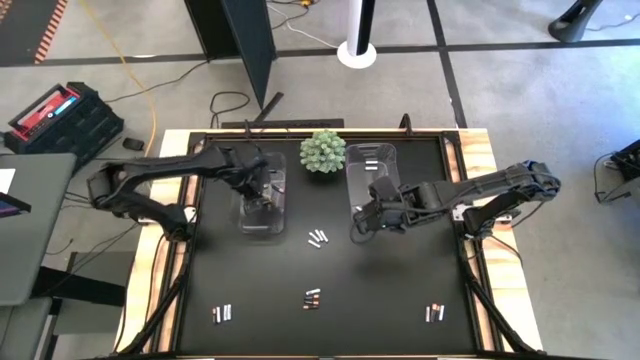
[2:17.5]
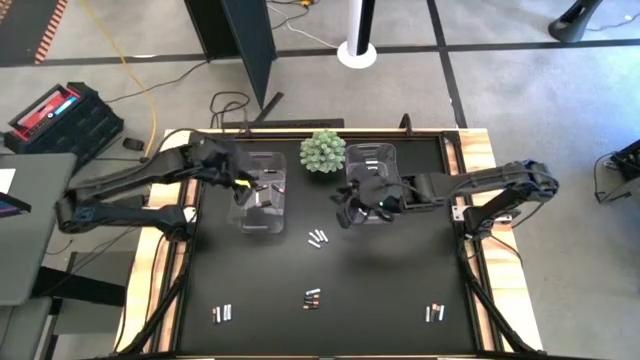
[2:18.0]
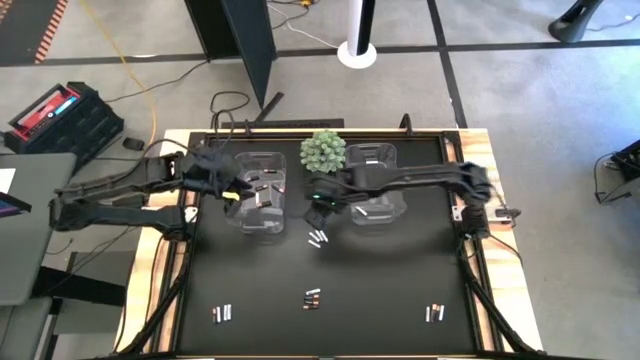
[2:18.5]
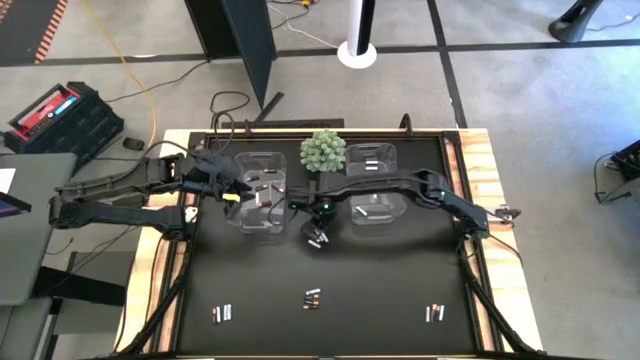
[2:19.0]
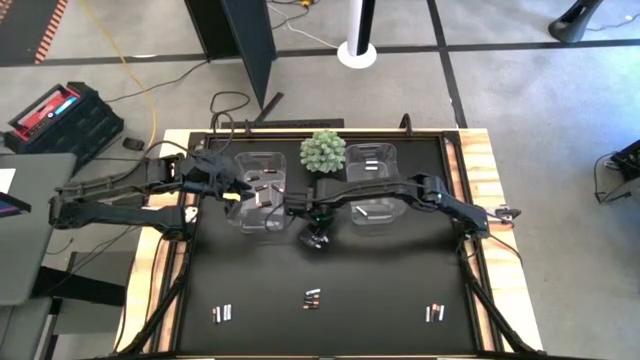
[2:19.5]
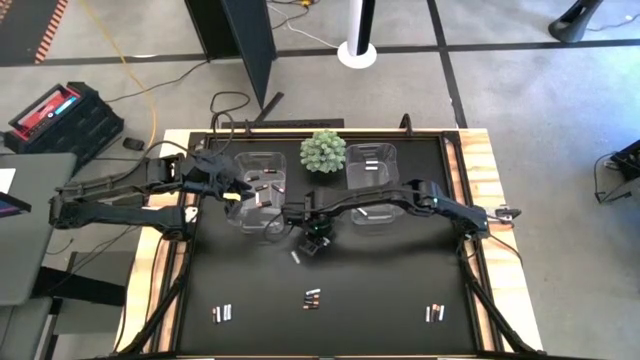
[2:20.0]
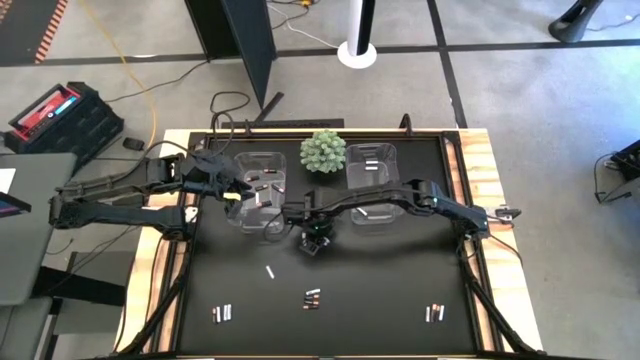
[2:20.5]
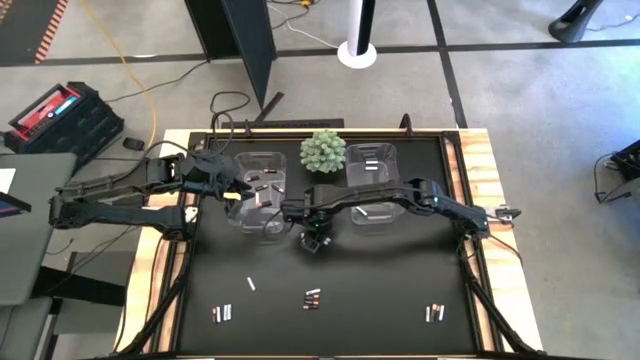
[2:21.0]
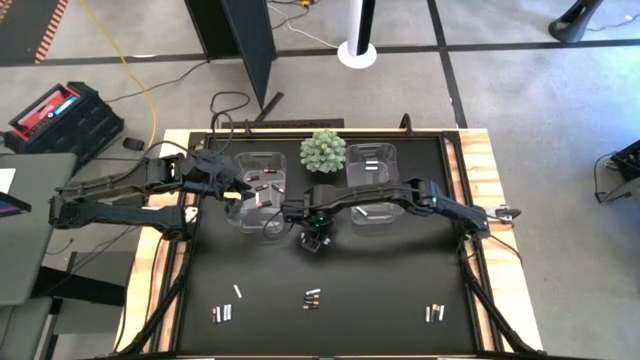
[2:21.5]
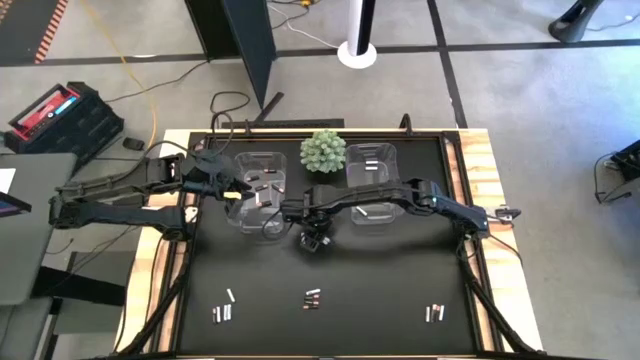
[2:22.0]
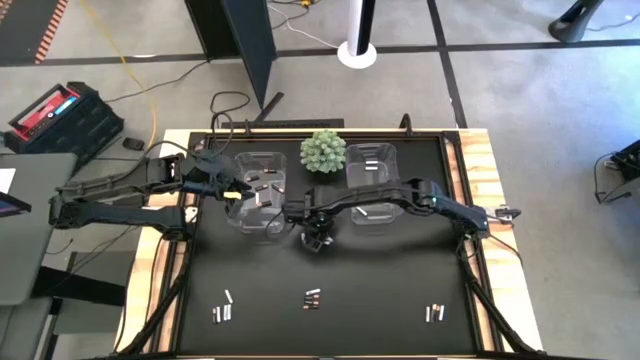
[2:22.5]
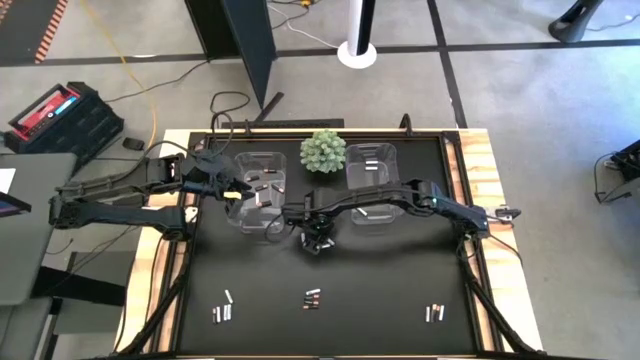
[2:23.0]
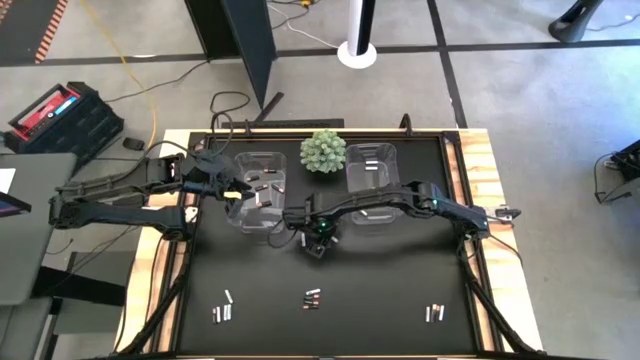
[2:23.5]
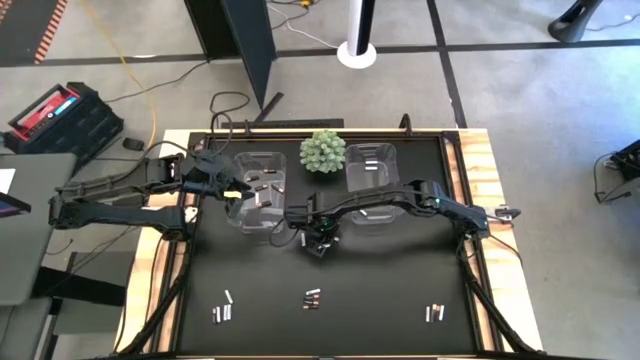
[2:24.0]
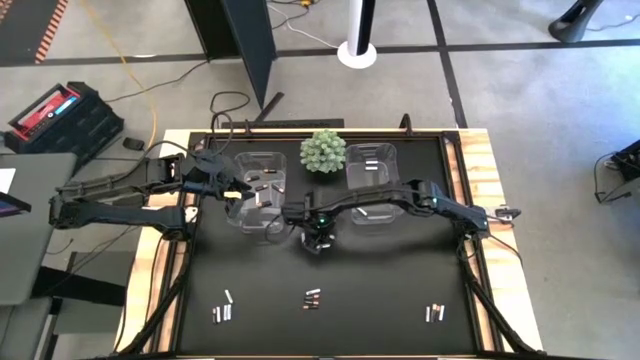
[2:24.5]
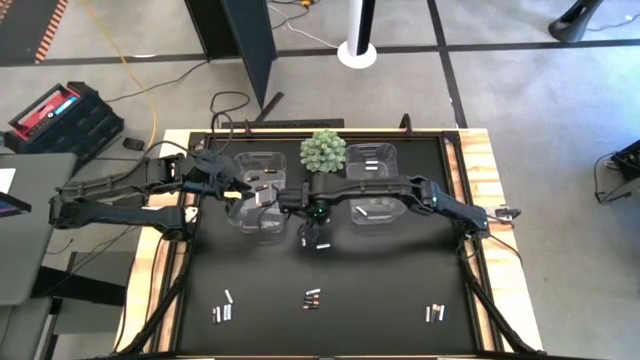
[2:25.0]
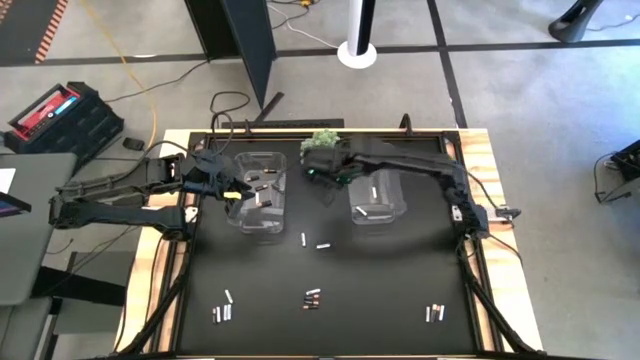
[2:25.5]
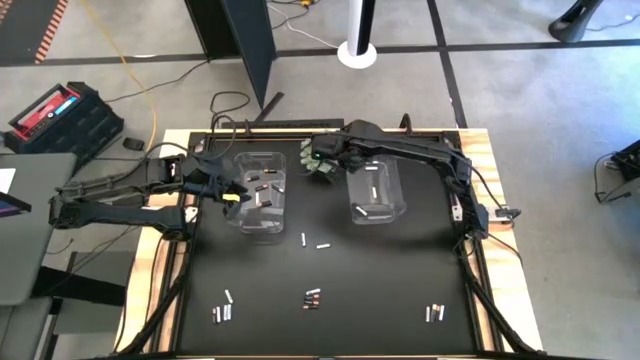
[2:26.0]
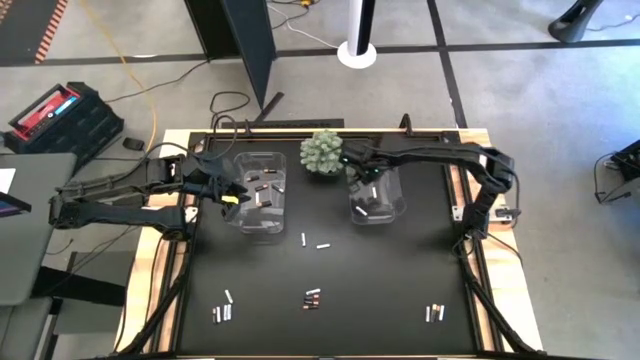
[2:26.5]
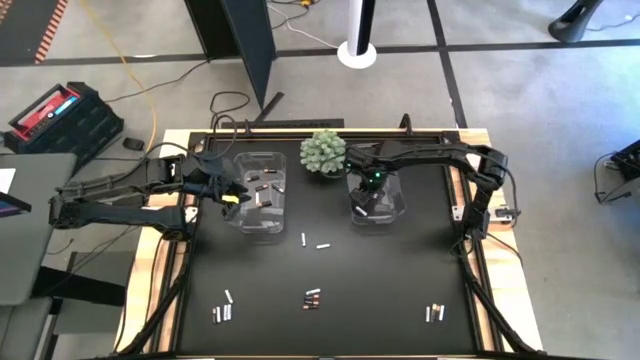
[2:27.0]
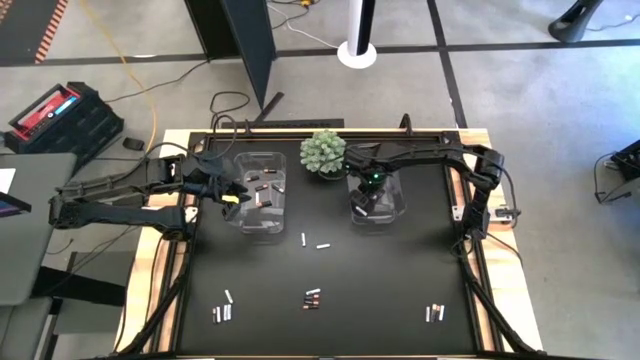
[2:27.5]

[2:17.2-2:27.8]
Task: Sort batteries
Put the white-blue battery into the right transparent bin

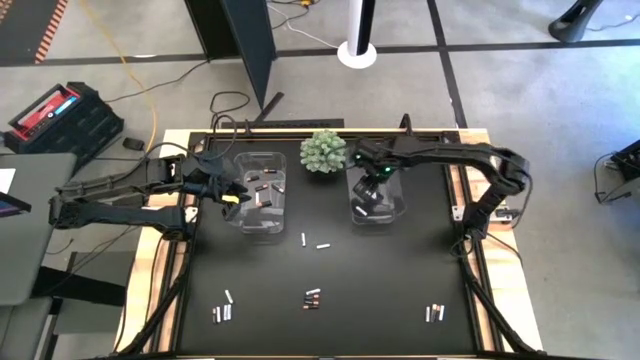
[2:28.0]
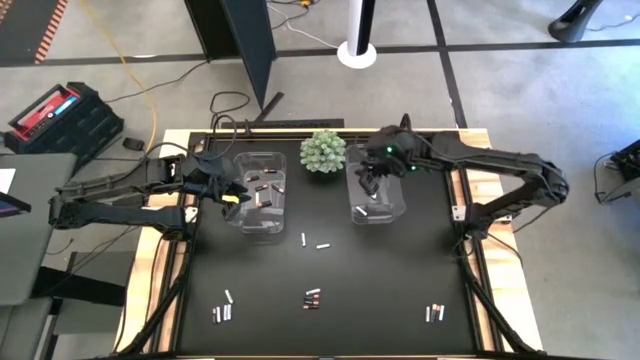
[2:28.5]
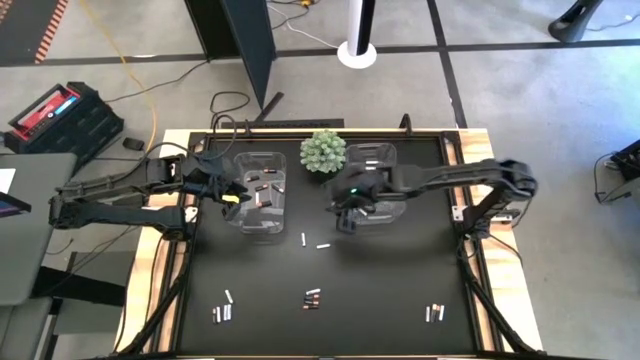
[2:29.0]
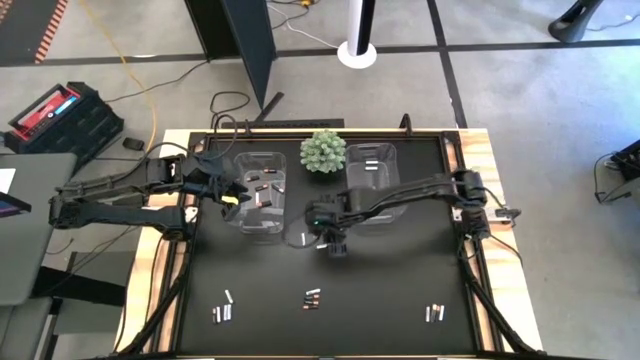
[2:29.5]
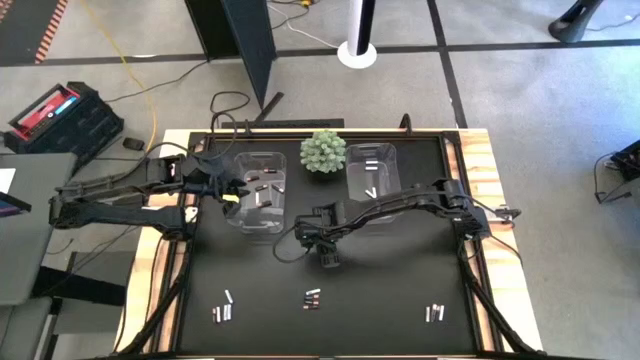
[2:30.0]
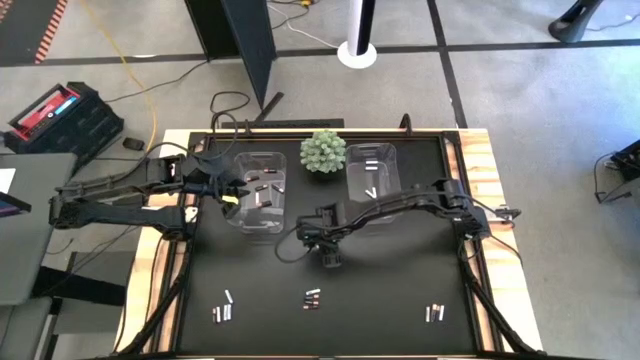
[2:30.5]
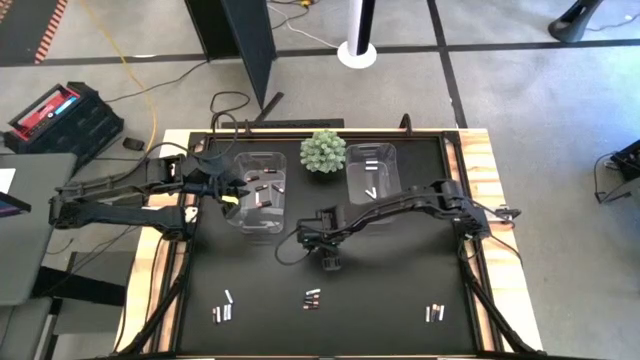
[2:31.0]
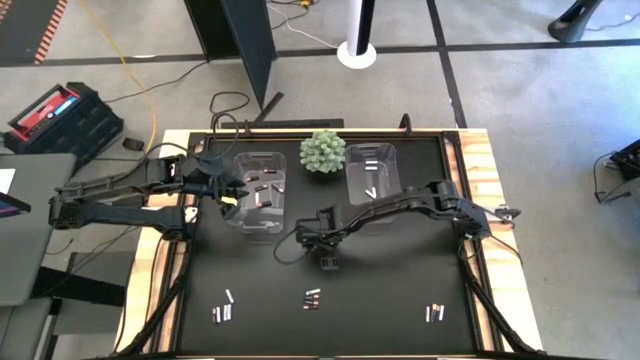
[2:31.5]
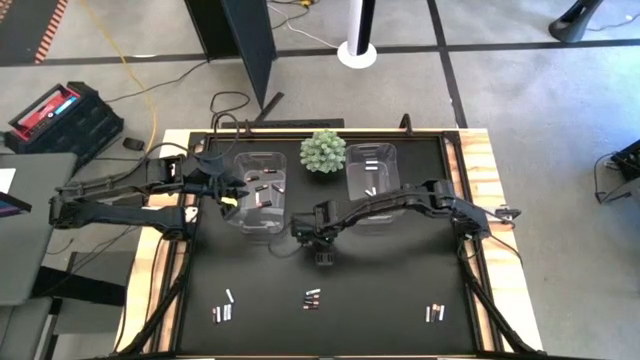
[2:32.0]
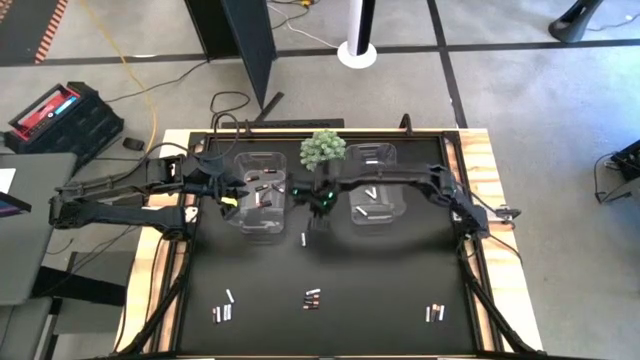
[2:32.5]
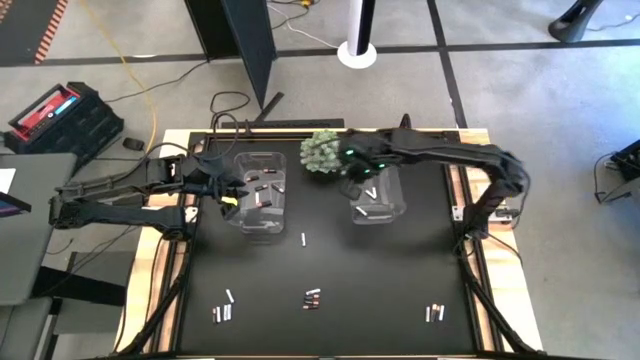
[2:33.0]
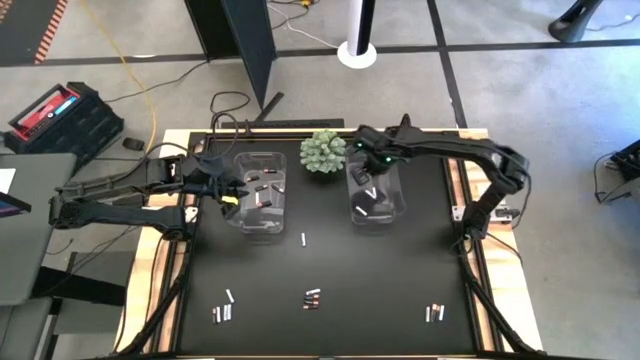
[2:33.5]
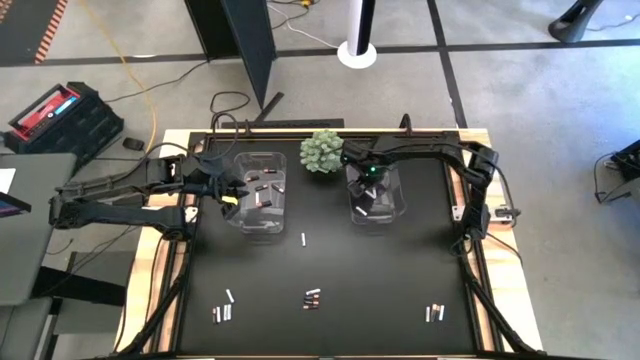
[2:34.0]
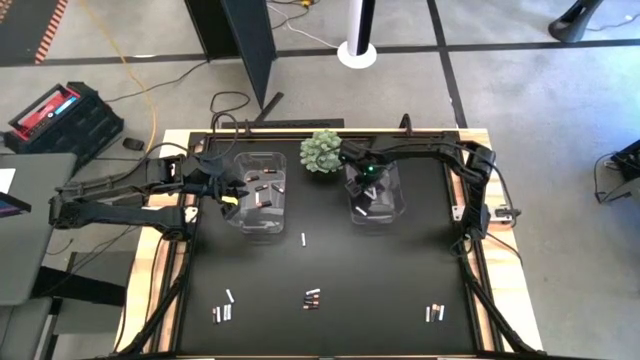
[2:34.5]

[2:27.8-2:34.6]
Put the white-blue battery into the right transparent bin

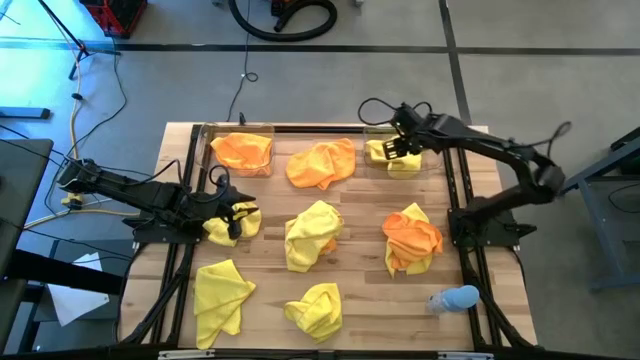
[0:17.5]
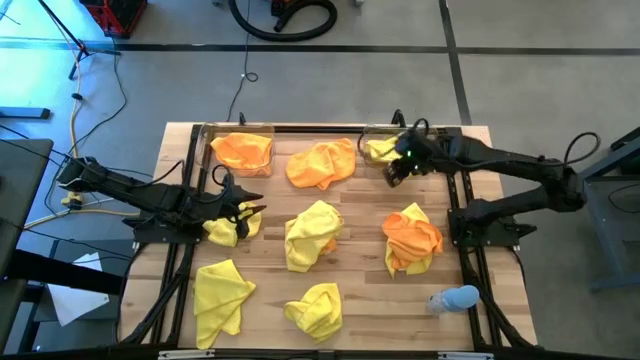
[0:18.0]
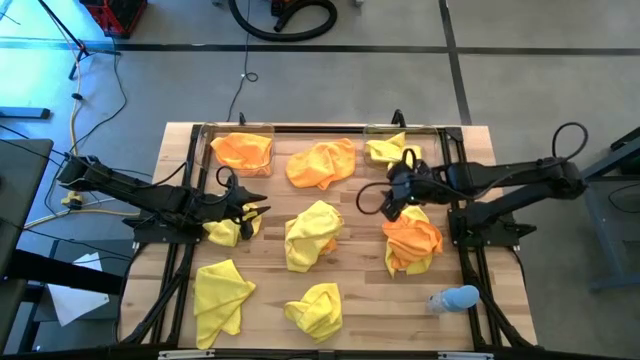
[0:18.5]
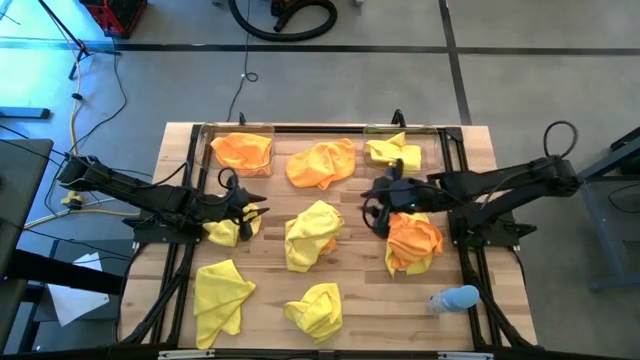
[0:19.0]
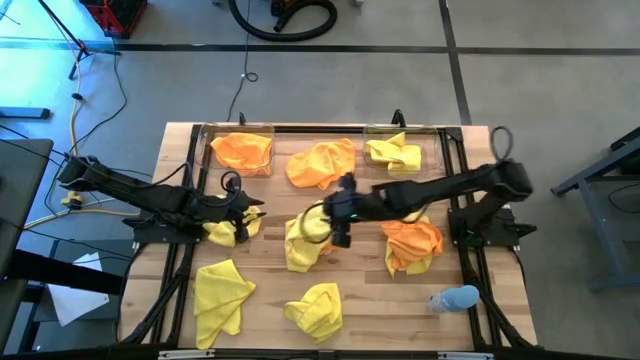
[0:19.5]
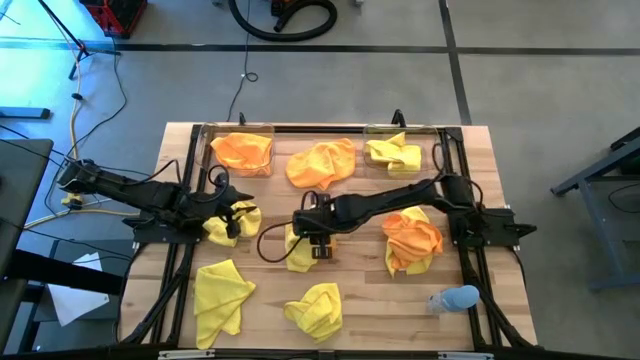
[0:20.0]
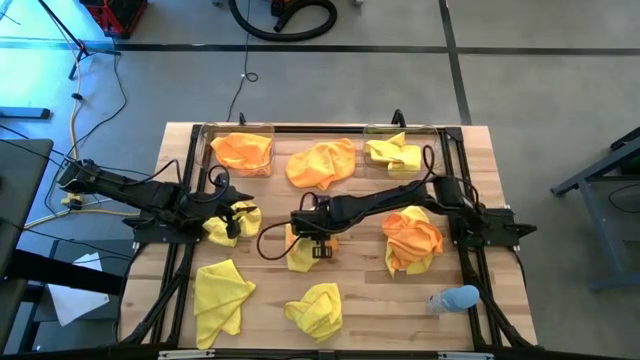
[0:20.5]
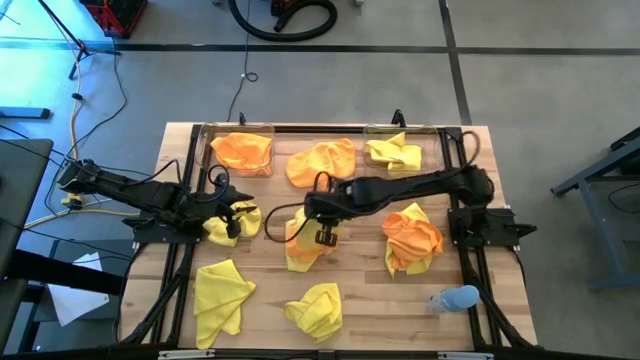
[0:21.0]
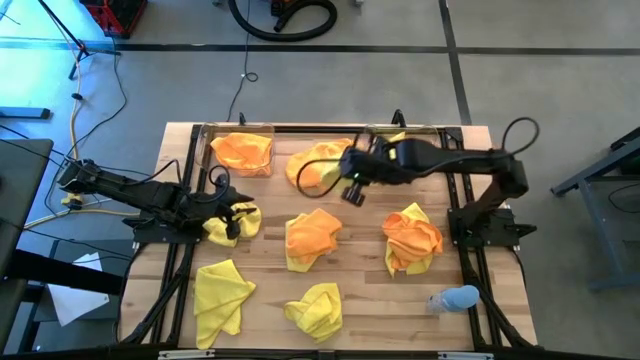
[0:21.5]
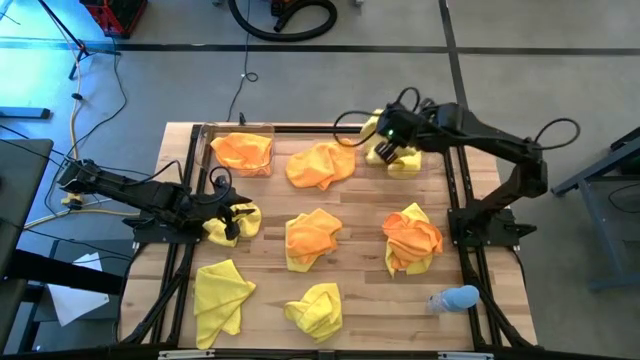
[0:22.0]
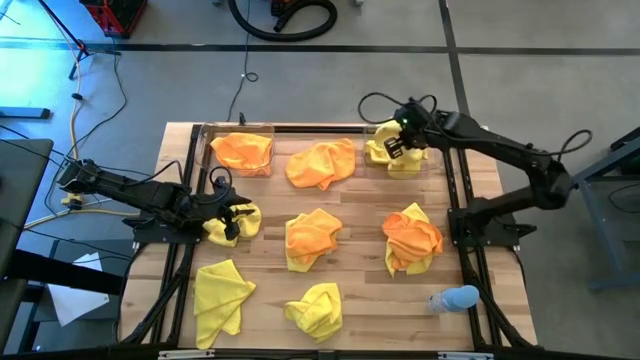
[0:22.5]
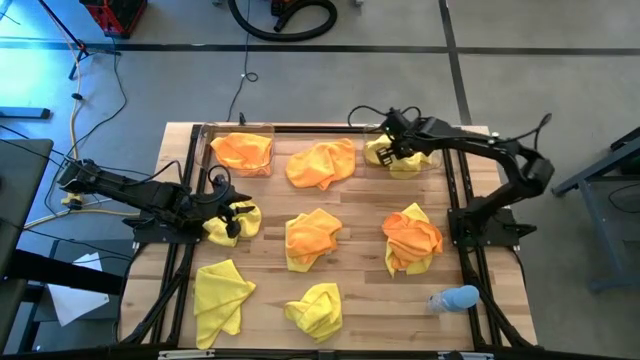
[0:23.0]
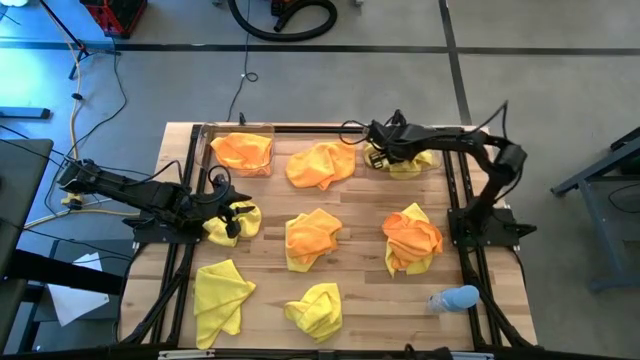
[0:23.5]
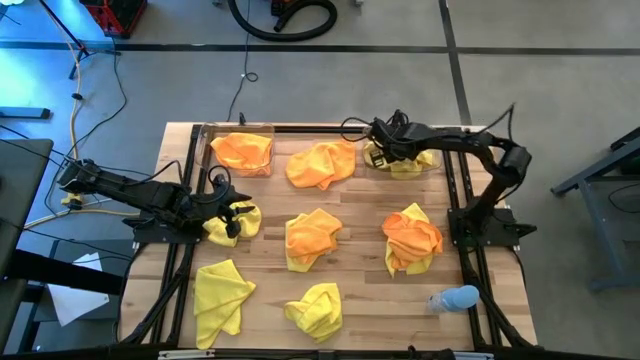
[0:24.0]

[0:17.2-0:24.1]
Task: Sort microfiber towel by color & place in baskets
Put the top center yellow microfiber cloth into the right transparent bin
